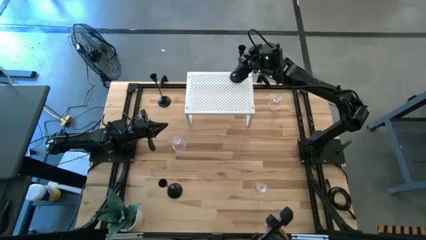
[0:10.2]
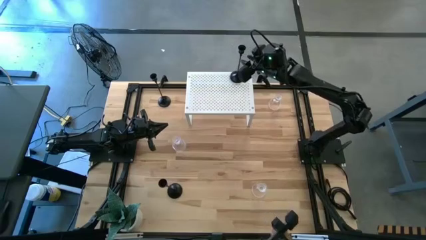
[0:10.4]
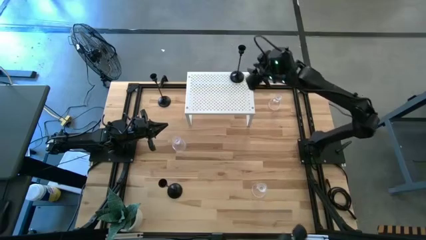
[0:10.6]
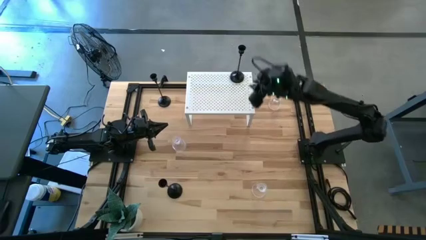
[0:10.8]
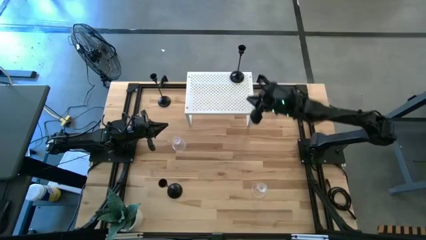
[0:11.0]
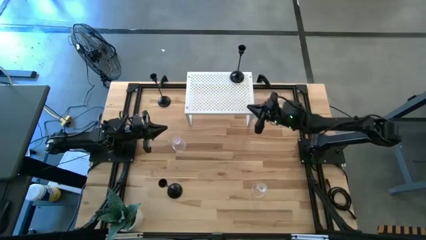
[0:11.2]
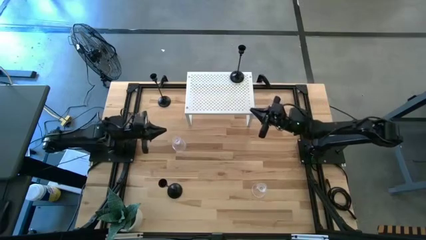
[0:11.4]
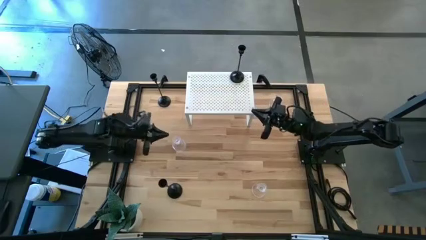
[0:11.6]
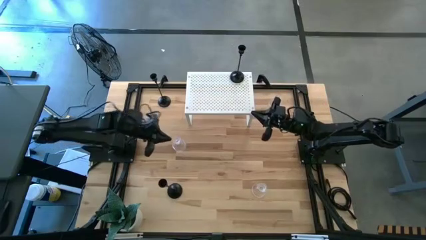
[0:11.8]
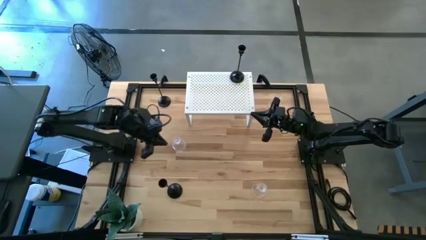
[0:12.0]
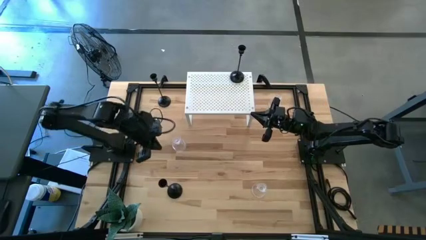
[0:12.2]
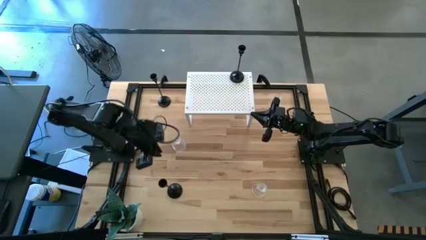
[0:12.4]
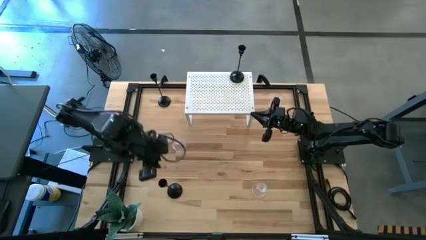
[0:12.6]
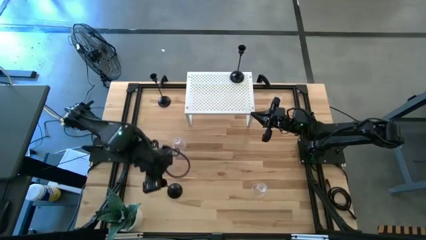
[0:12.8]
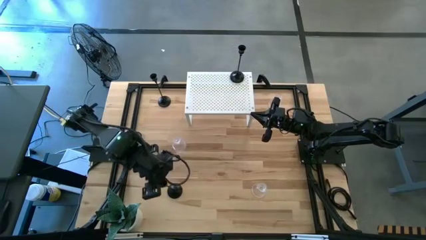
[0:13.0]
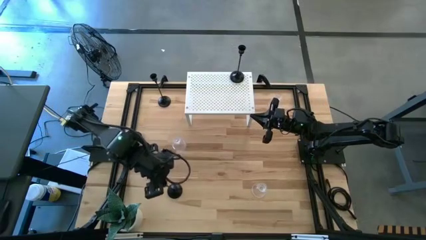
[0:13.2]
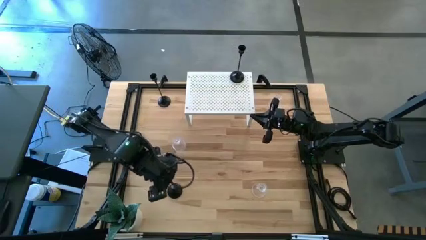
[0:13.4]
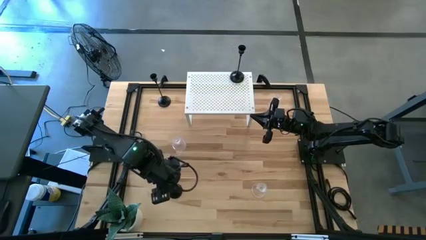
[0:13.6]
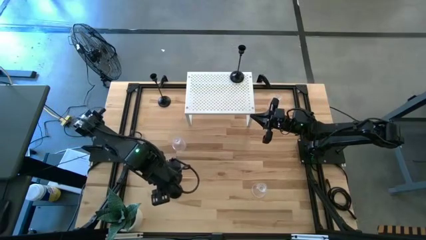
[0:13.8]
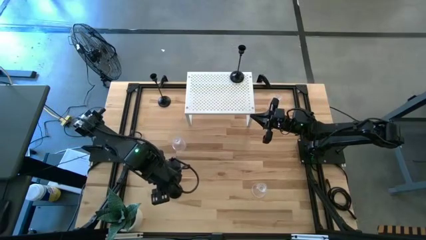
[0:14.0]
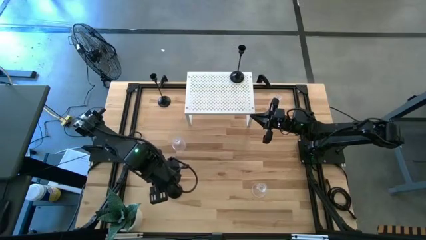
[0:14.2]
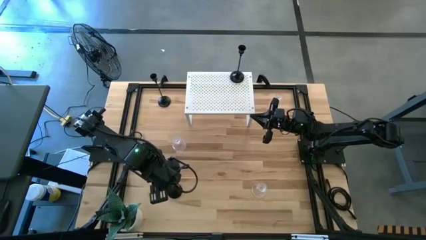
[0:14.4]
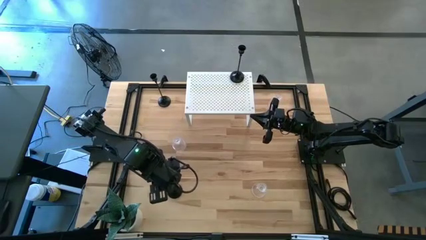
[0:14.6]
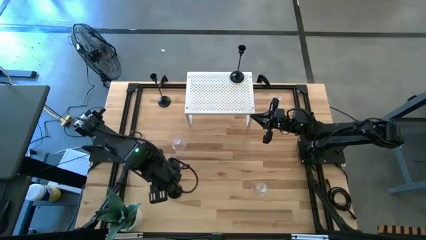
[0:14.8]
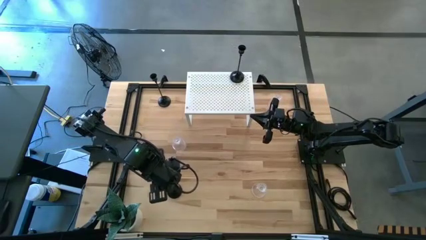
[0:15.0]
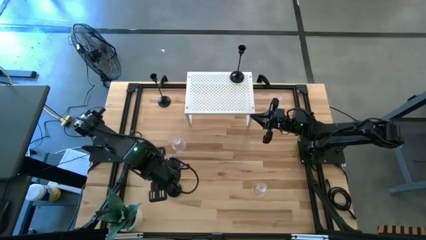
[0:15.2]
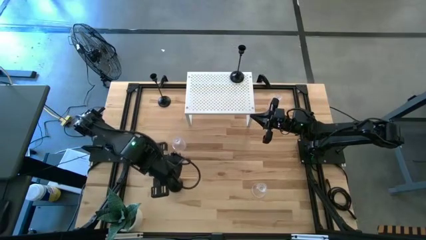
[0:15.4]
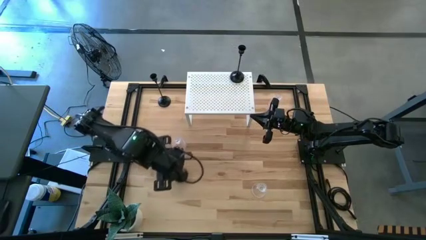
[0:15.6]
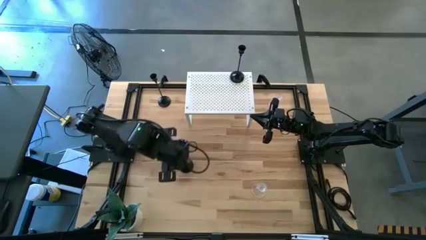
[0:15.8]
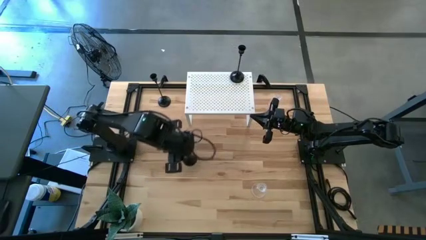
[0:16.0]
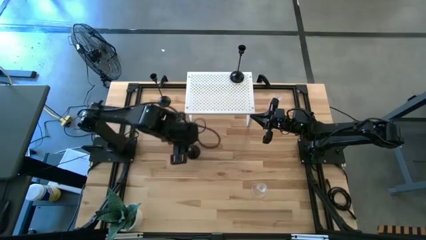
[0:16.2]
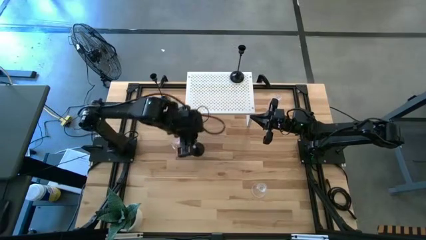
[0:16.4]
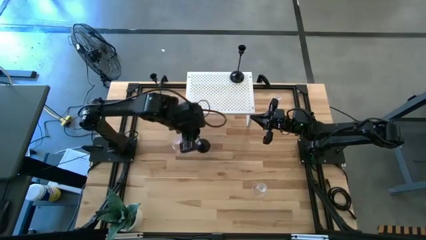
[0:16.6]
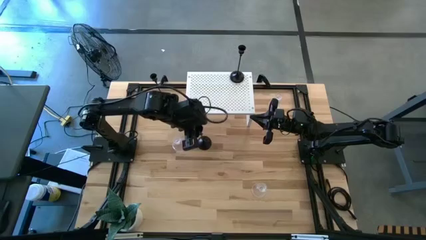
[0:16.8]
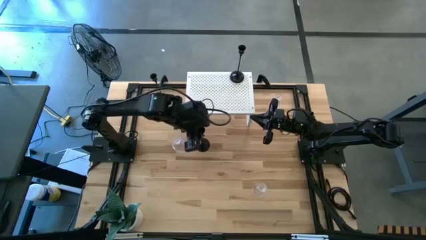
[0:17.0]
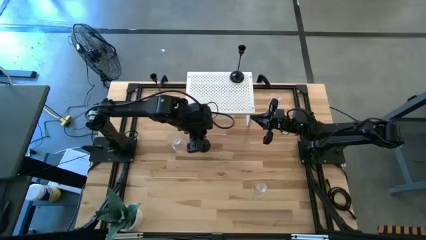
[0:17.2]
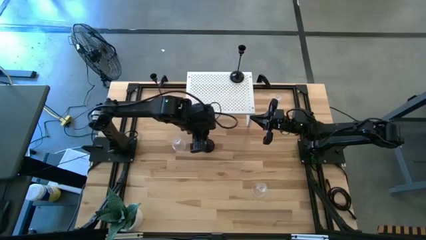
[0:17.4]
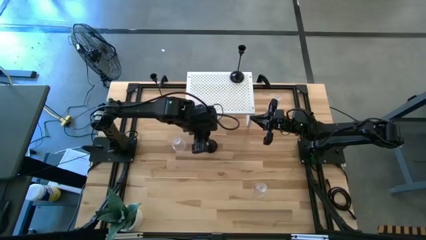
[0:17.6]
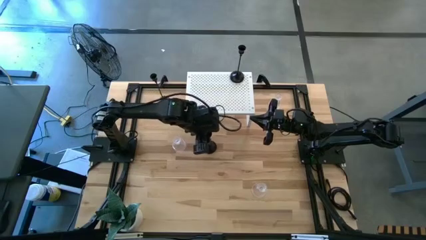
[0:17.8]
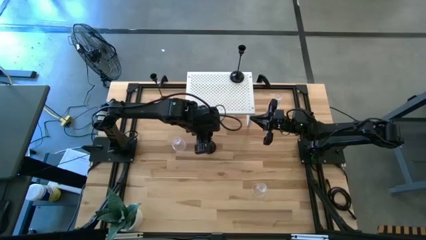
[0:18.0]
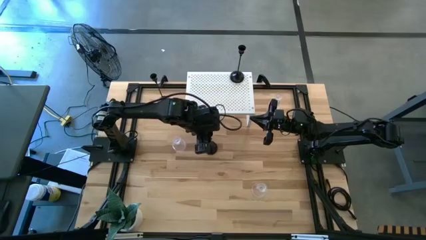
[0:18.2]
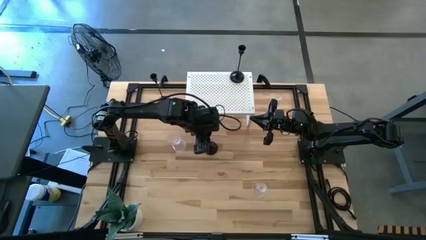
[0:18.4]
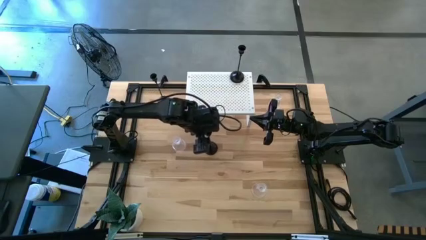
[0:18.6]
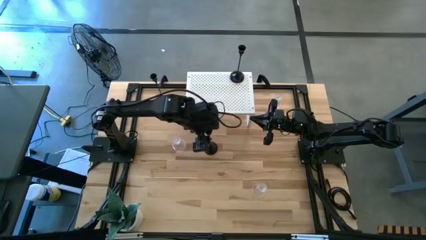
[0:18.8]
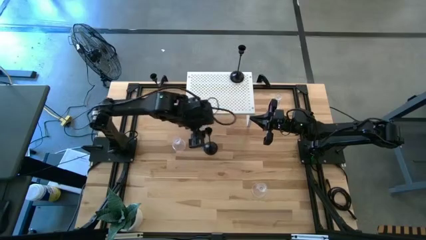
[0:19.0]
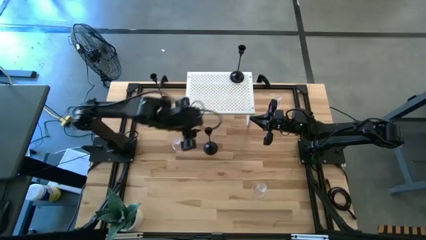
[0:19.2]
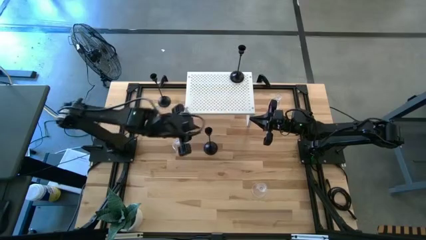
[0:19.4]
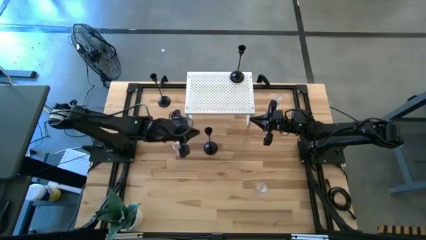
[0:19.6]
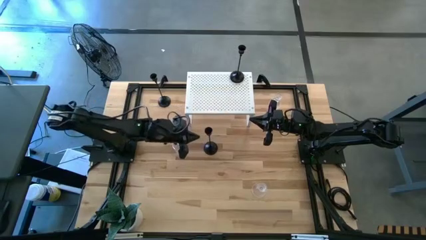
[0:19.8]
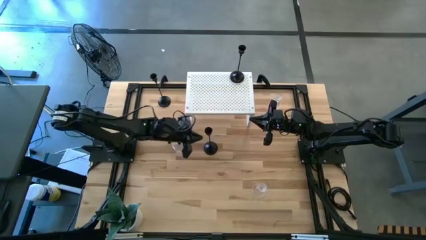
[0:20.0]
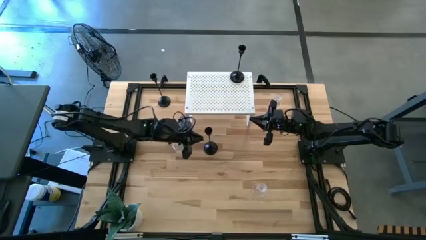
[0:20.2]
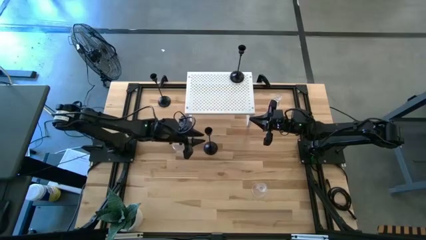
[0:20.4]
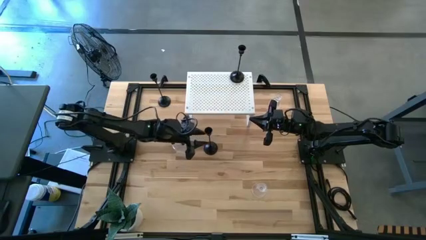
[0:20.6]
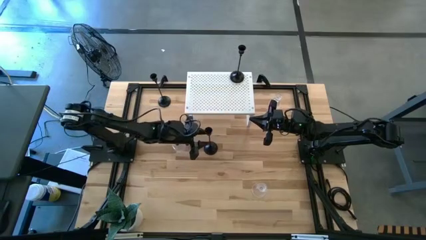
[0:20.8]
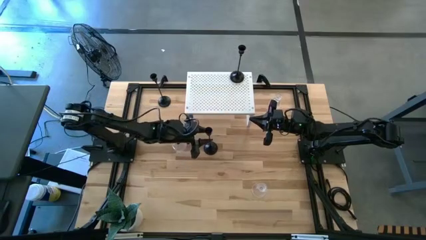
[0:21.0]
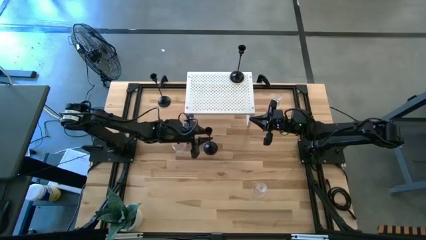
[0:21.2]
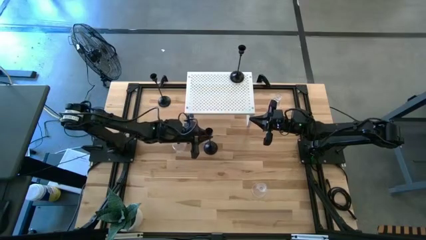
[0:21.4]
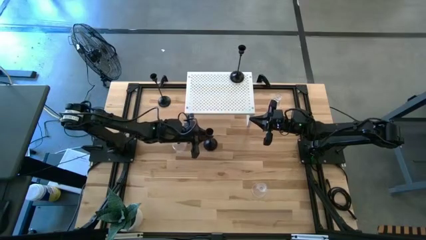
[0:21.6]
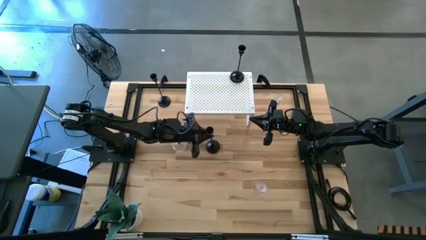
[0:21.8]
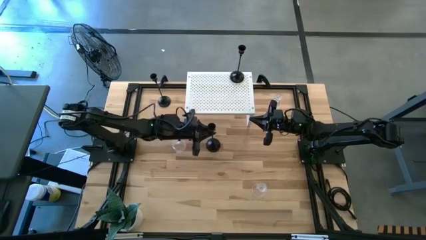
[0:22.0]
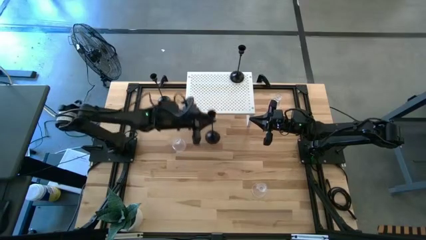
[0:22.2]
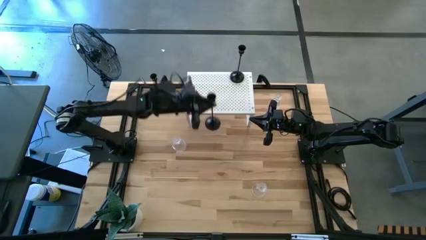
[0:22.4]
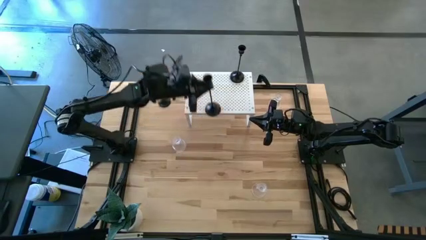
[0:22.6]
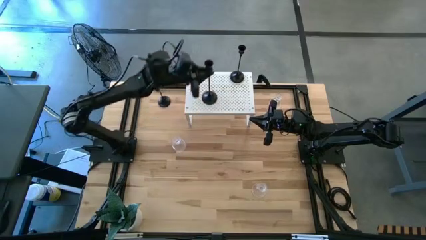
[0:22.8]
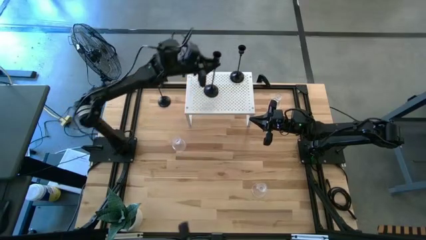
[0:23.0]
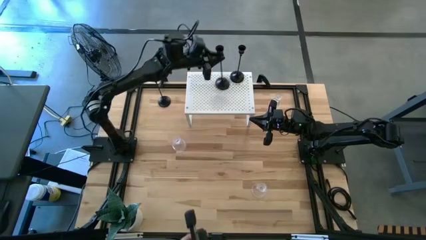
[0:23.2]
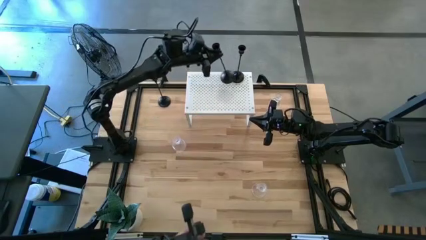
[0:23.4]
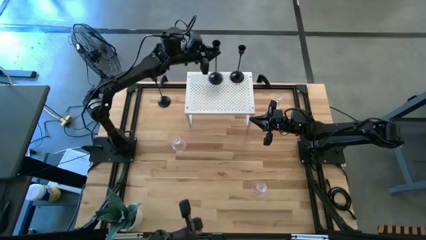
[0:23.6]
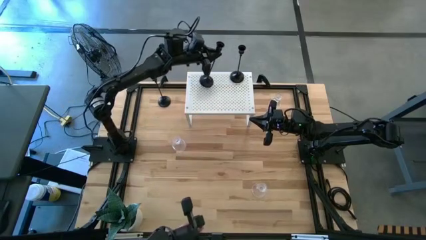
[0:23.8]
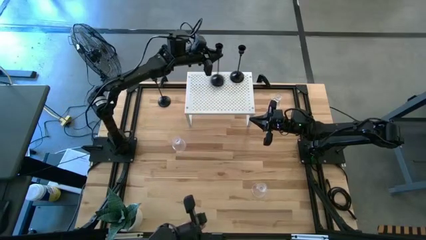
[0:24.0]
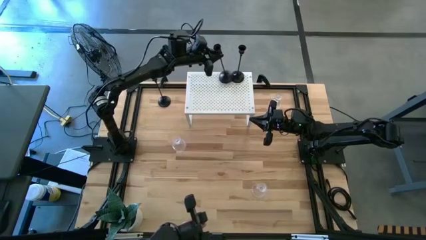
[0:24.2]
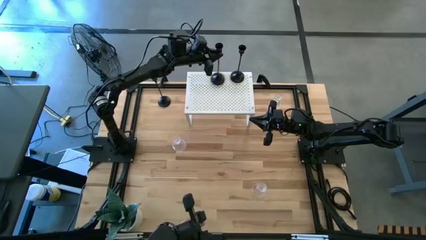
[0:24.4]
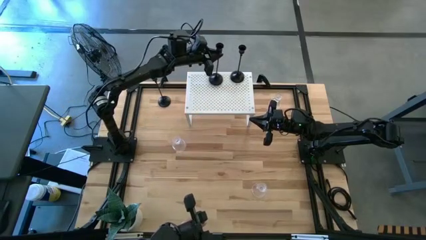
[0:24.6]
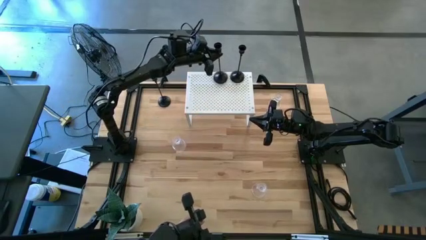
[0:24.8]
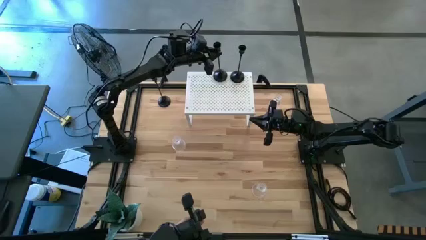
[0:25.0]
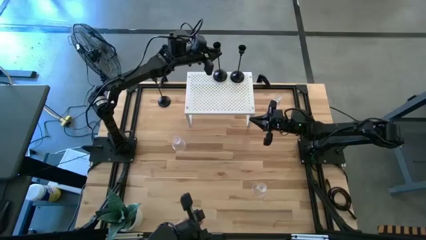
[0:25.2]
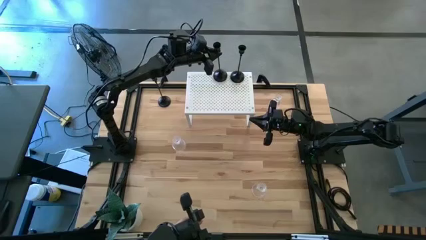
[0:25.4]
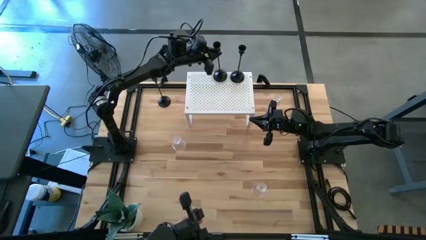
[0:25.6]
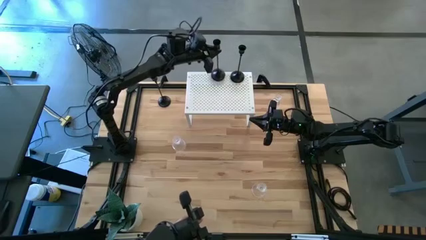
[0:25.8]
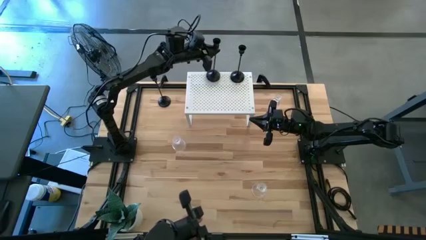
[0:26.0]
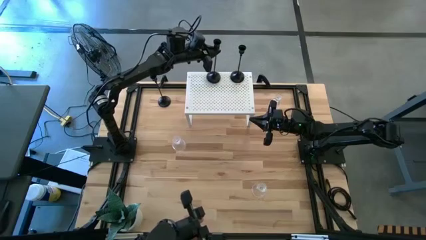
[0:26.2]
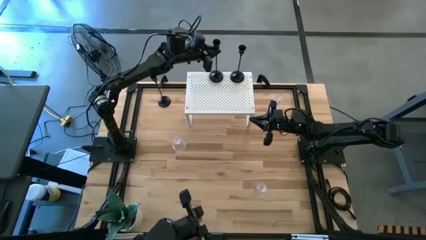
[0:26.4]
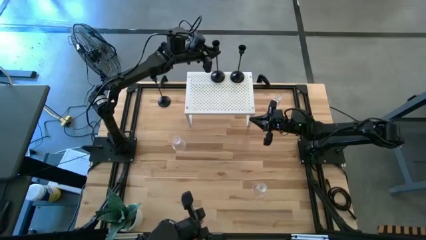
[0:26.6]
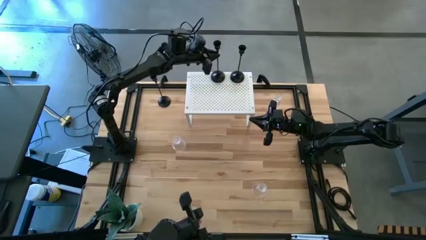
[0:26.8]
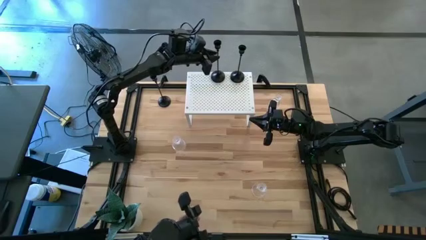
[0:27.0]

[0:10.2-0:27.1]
Task: Pick & Place candle stick holders
Put the bottom black candle holder on the shelf
